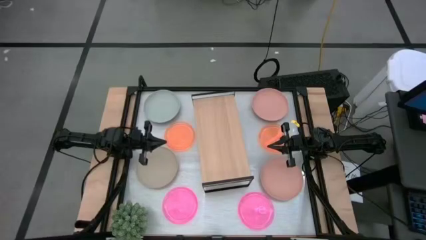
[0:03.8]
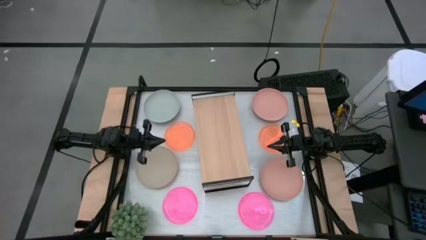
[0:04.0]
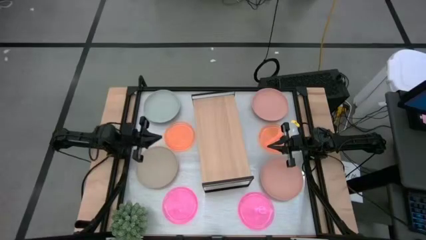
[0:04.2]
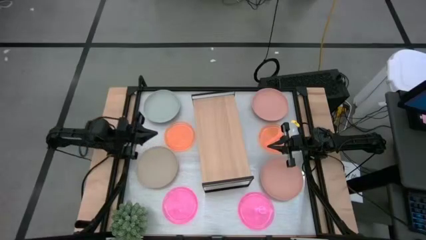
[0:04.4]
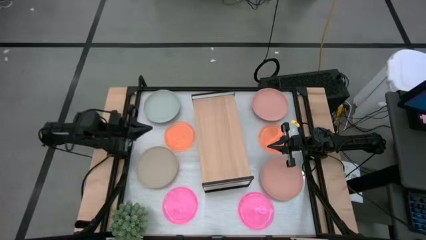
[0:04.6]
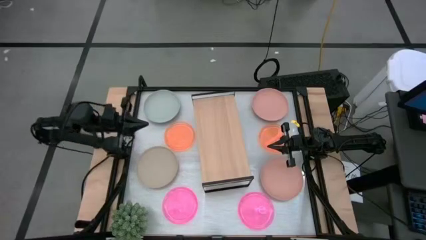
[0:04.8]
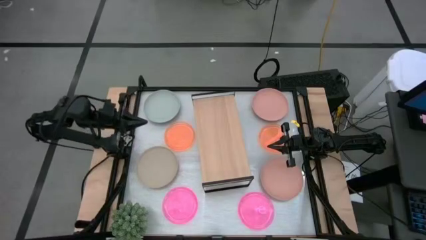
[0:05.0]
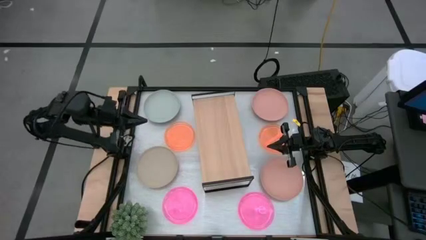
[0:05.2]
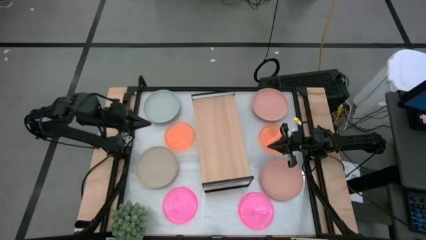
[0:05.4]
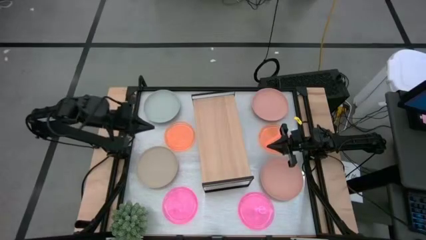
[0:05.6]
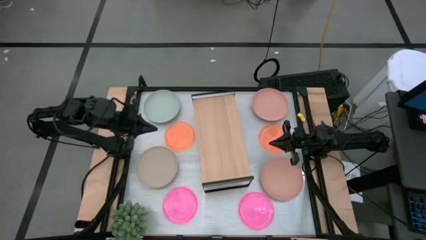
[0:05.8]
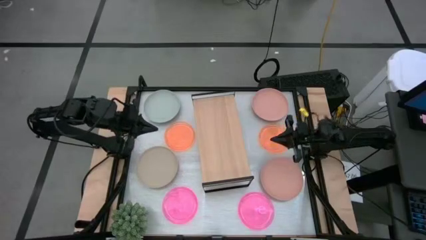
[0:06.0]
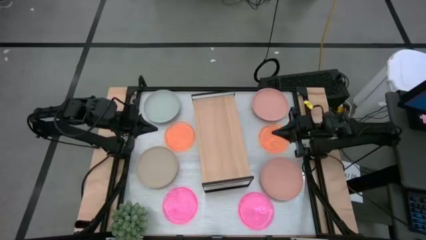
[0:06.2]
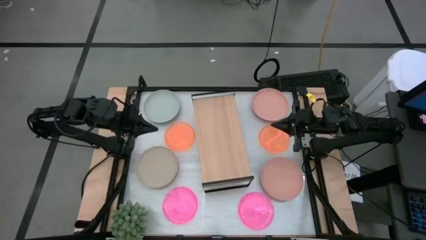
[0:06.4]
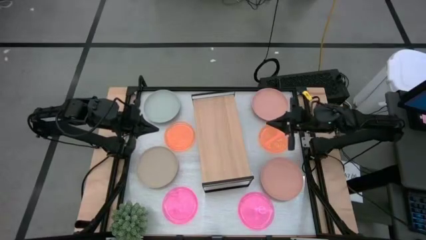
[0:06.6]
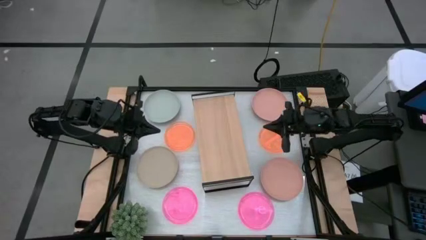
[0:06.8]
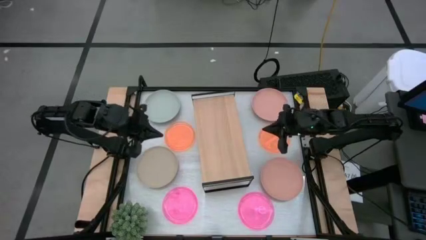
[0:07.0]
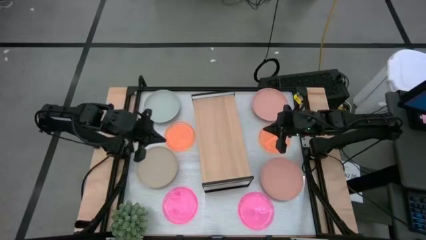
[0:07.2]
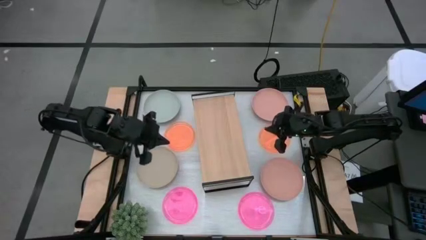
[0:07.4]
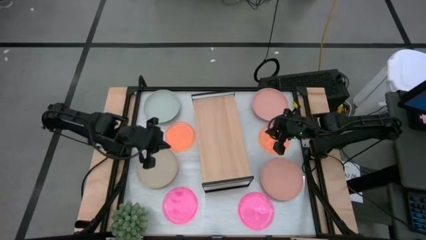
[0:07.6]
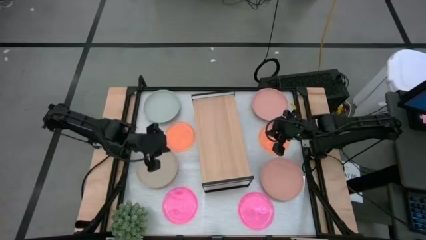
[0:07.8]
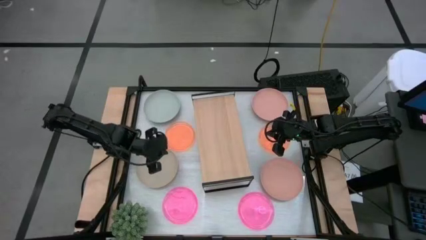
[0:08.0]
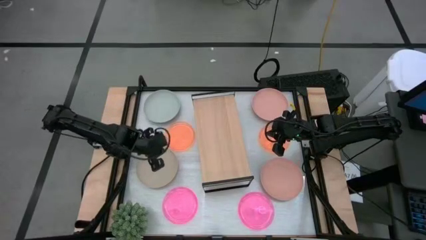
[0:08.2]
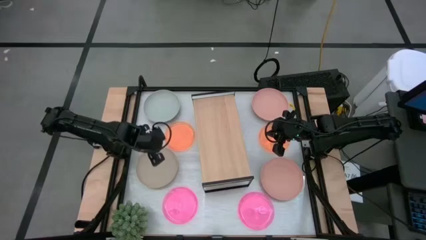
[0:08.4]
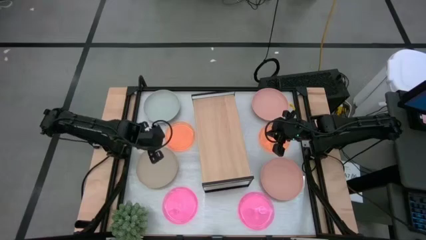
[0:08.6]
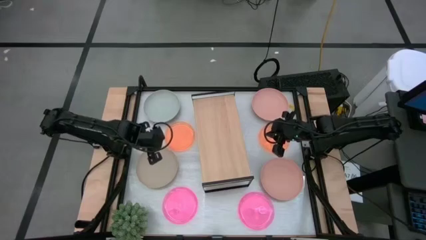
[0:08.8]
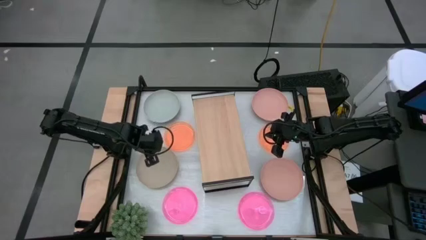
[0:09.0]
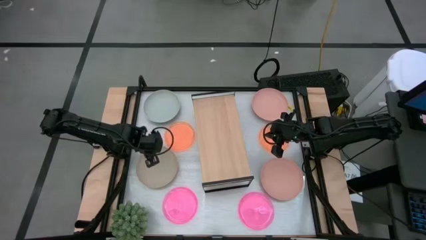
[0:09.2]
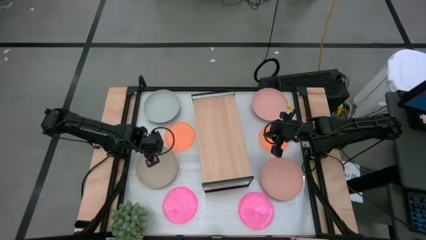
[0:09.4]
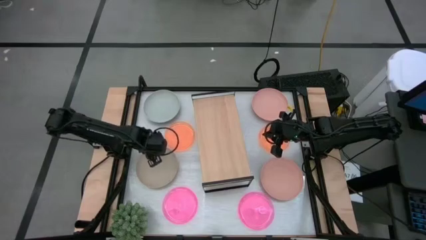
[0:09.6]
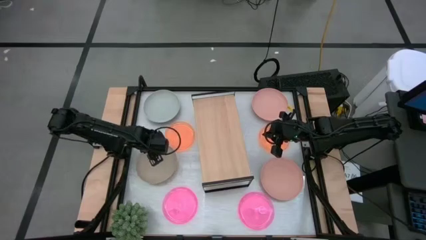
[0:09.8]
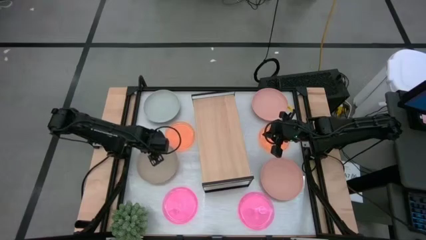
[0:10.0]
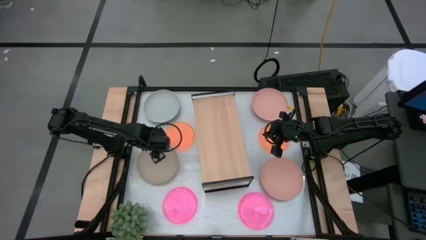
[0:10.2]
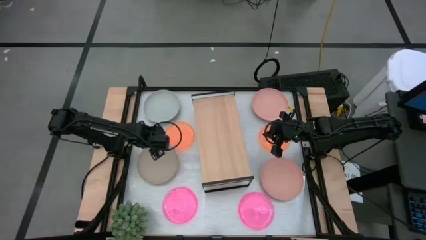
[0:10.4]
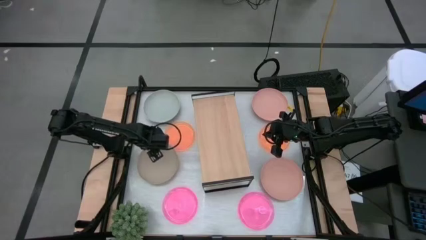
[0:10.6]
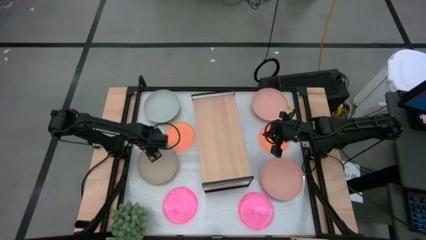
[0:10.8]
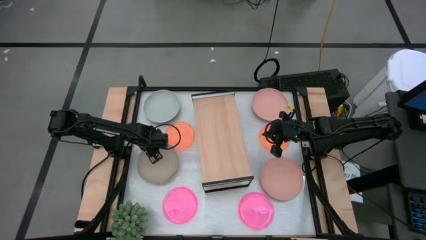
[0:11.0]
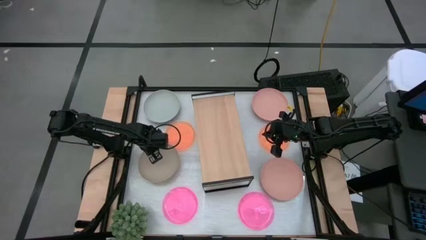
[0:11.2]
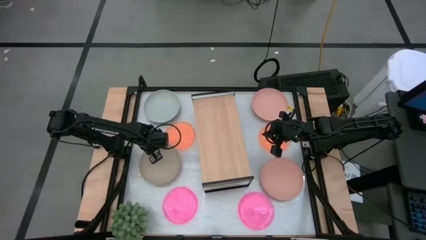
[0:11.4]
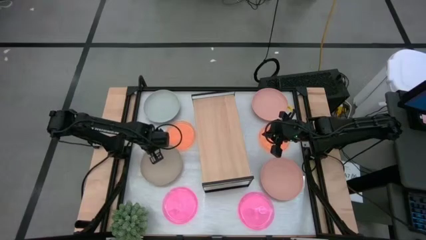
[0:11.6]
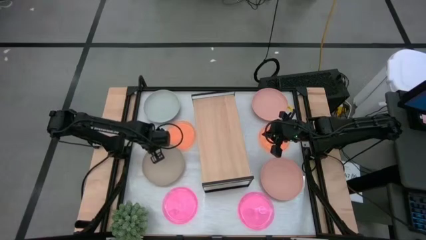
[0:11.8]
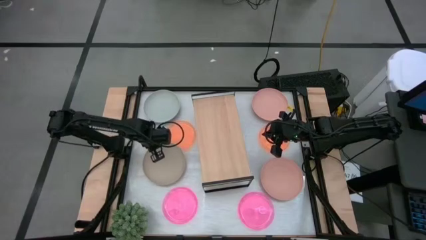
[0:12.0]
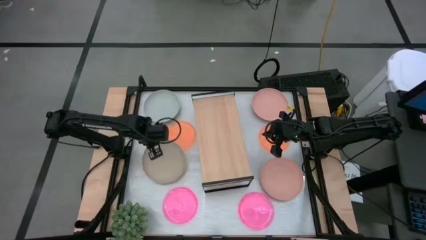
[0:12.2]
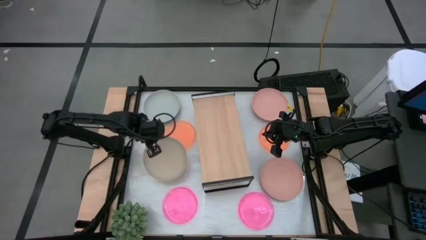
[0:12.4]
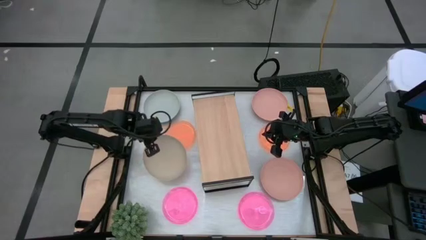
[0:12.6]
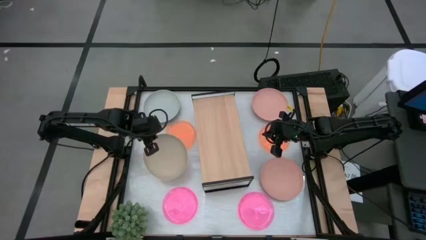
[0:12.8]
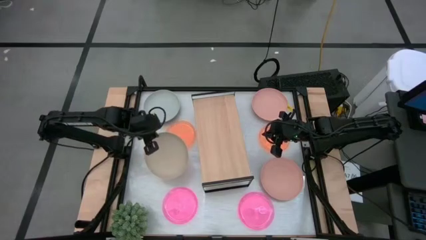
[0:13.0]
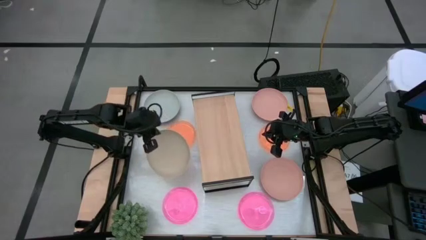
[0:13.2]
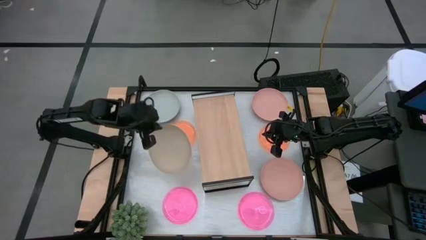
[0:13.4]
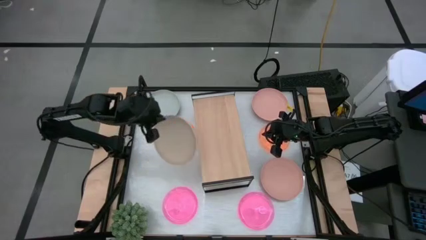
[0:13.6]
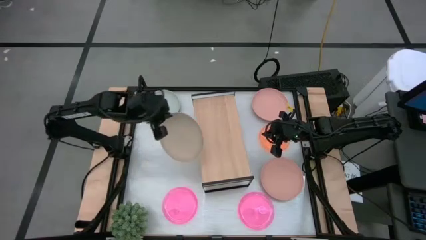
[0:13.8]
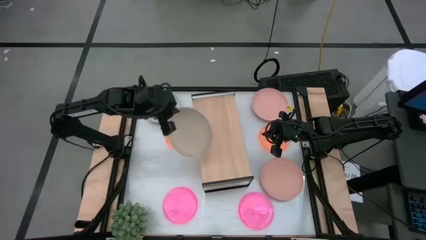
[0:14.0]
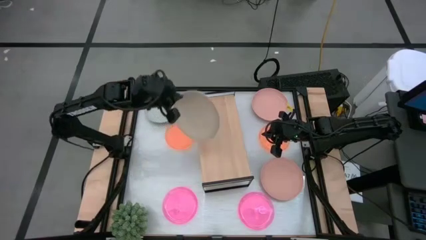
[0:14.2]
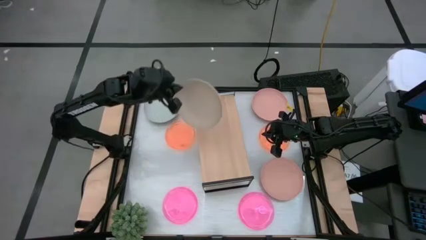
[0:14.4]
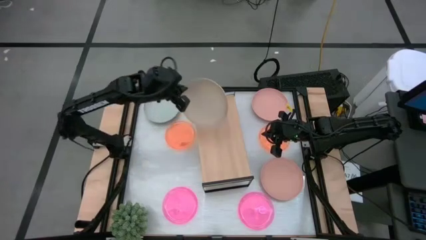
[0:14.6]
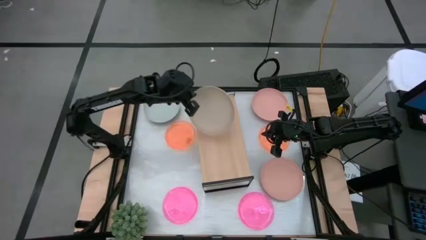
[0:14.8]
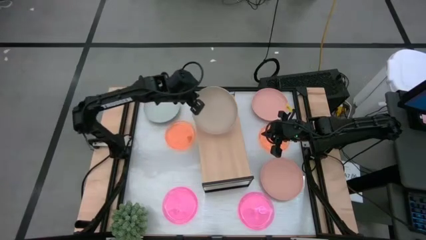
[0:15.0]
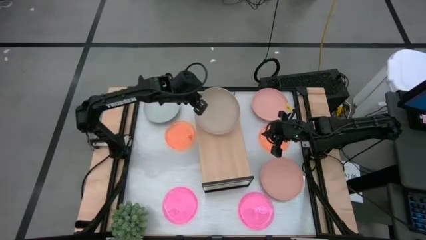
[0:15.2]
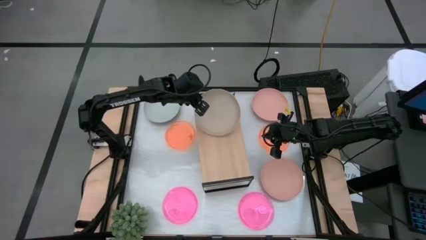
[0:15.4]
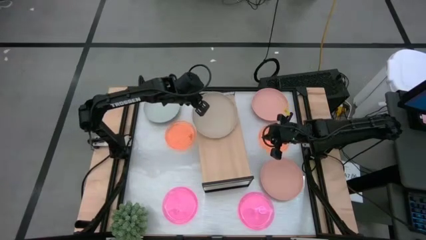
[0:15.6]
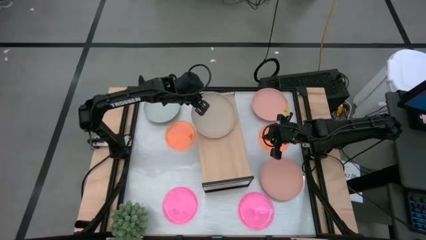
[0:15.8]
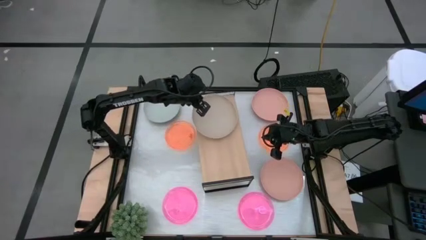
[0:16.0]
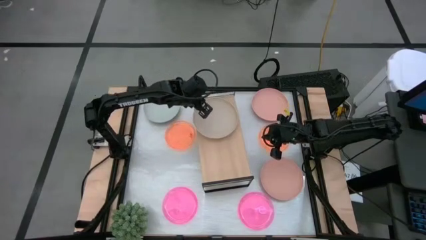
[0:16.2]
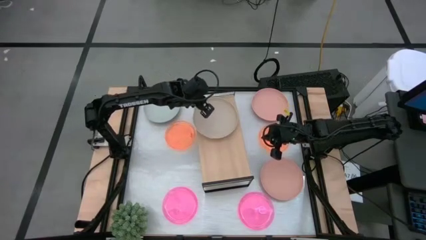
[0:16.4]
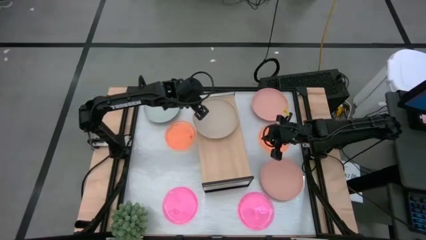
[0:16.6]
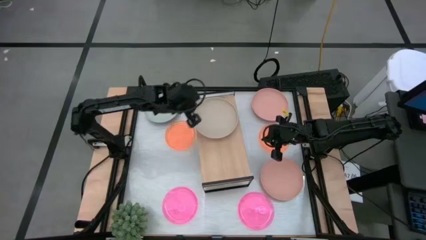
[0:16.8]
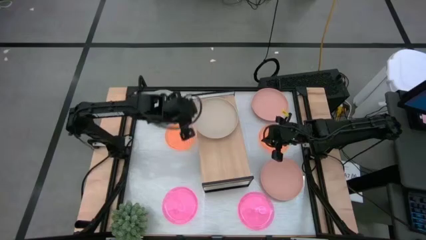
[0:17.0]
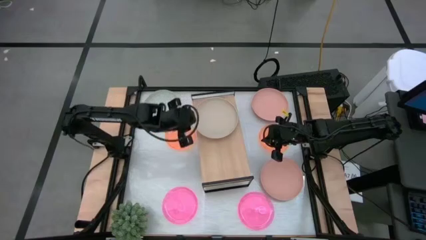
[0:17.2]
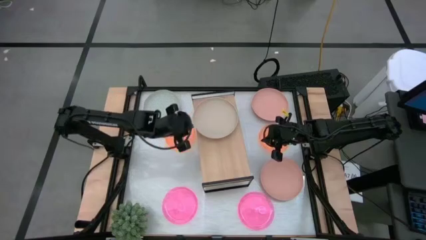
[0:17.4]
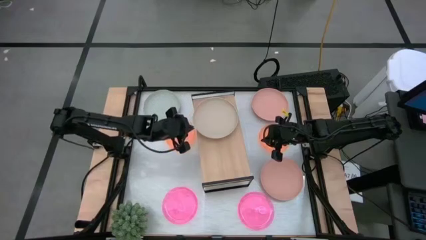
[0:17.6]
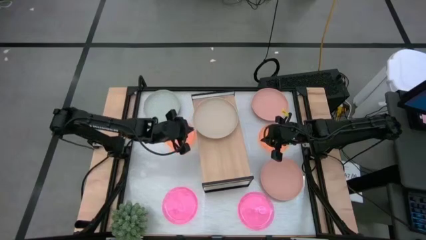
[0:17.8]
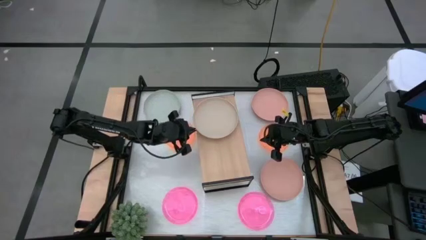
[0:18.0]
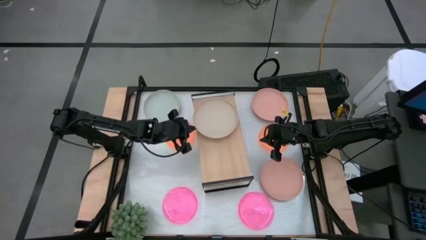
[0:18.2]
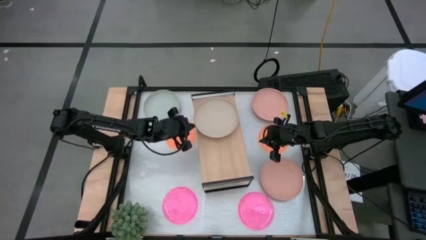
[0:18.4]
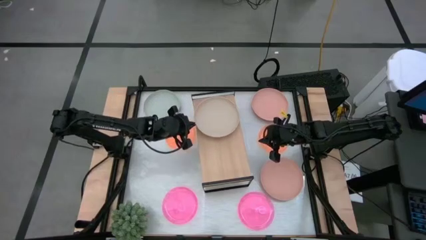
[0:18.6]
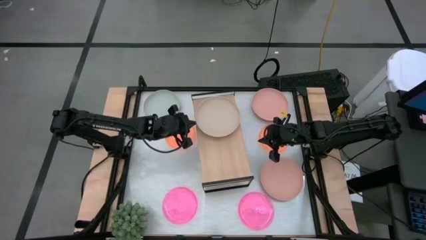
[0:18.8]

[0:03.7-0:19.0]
Task: Place and stack plates onto a shelf
Put the brown plate on the shelf
